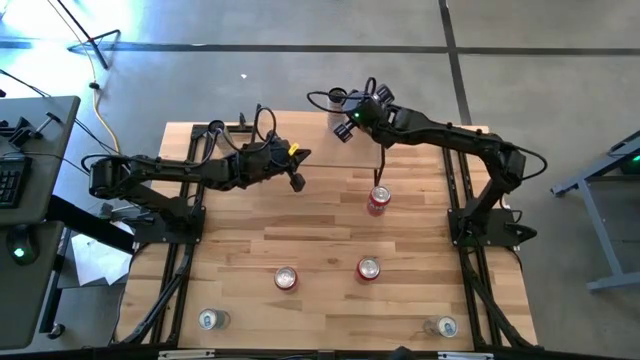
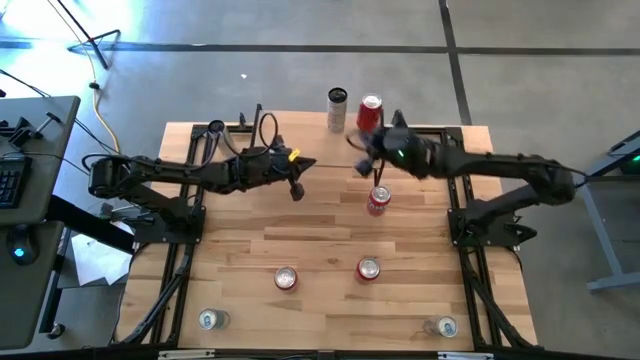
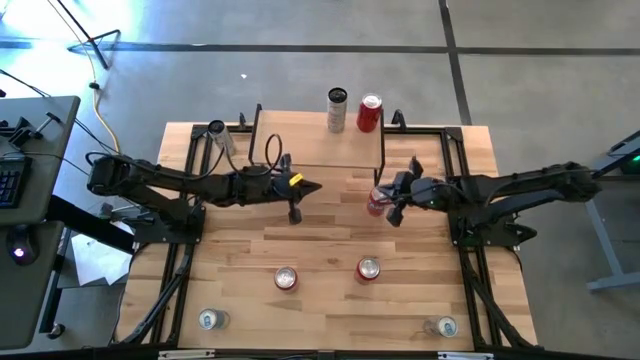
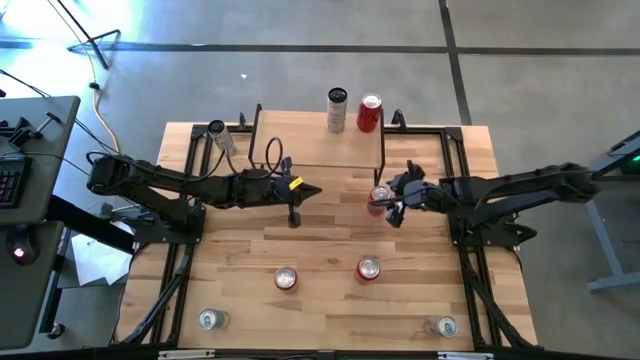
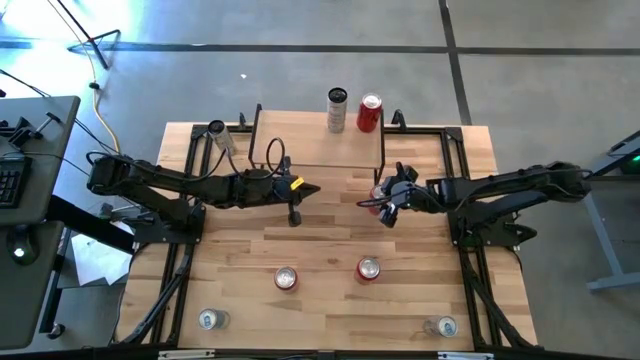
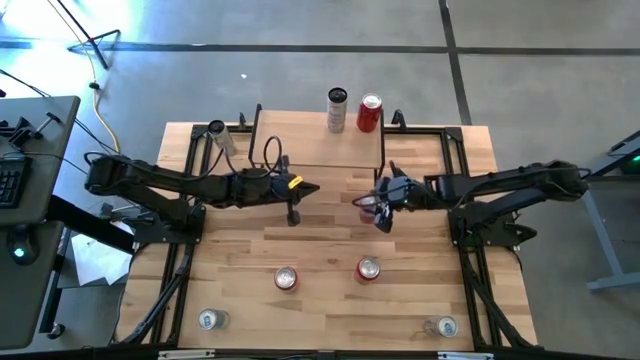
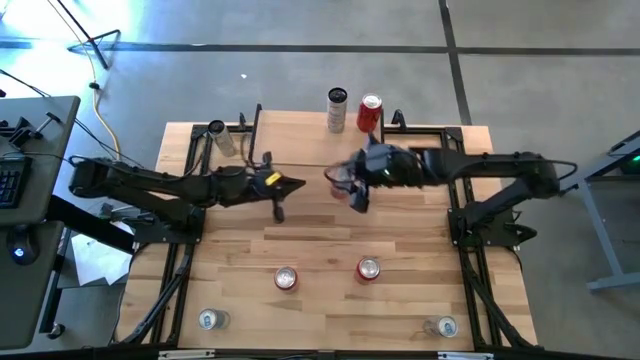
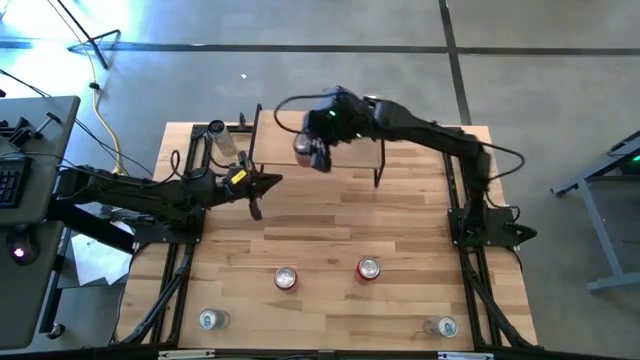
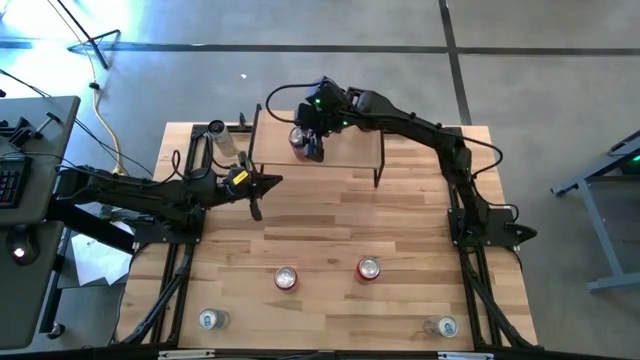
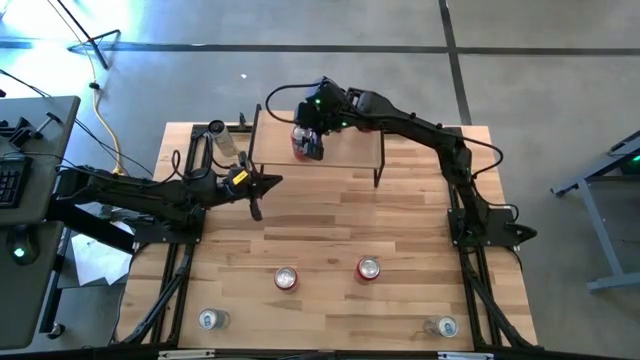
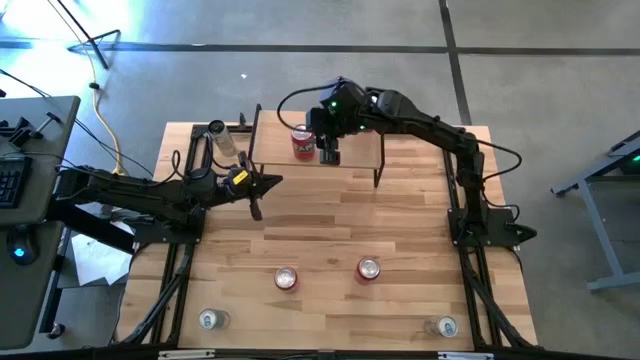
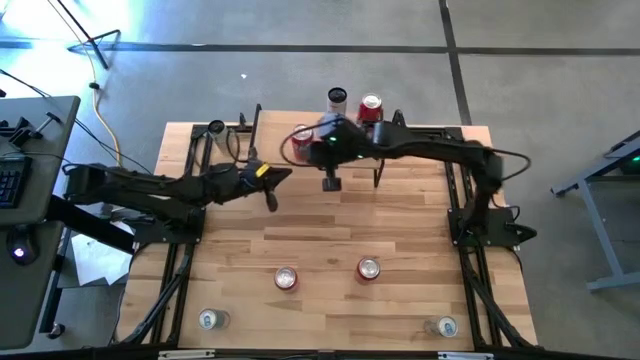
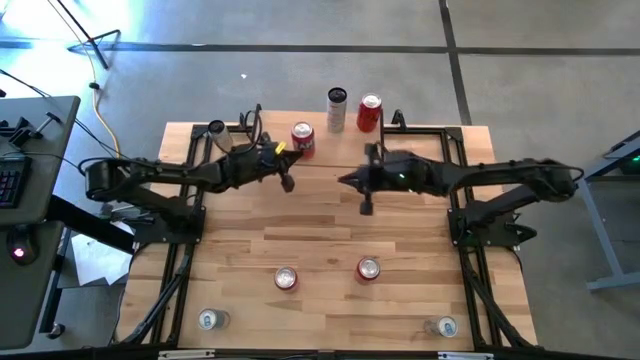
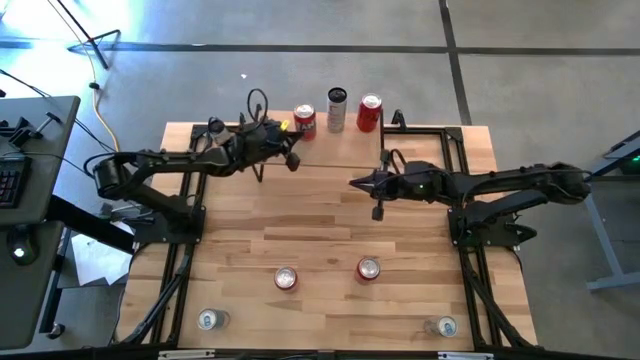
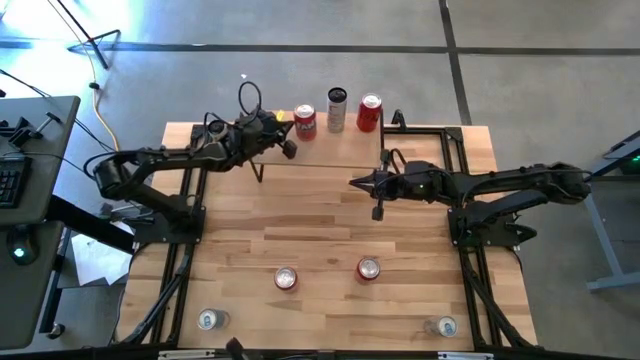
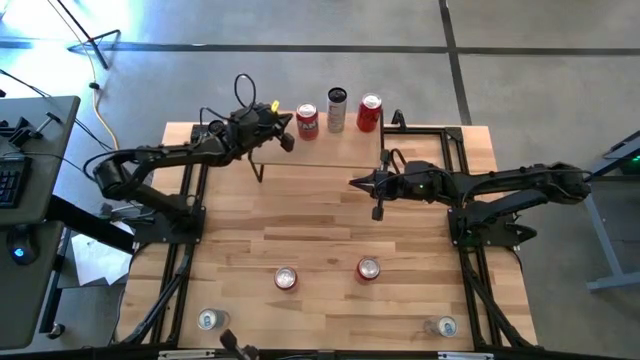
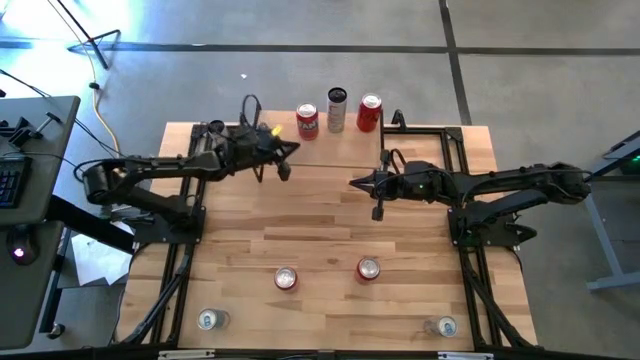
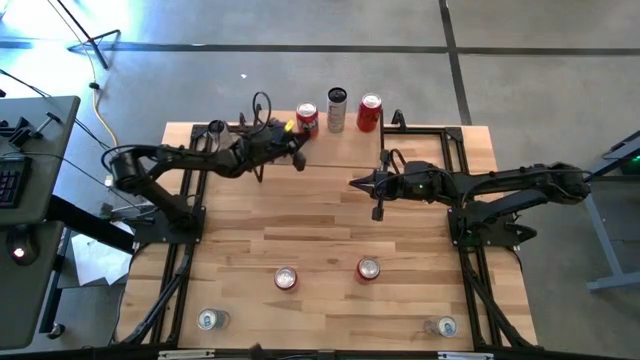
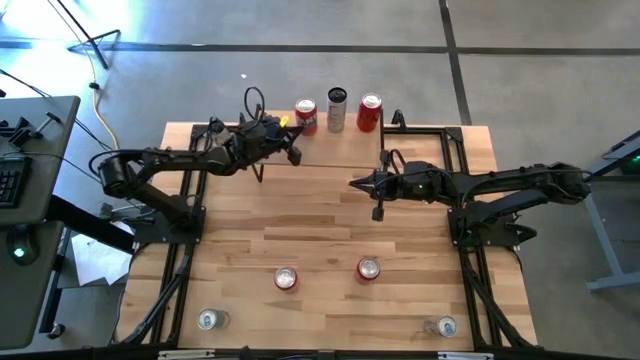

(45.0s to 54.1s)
Task: Place canned beverage on shelf
Put the top red soda can on the shelf

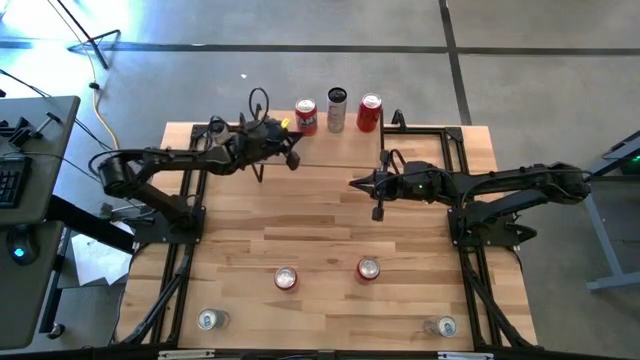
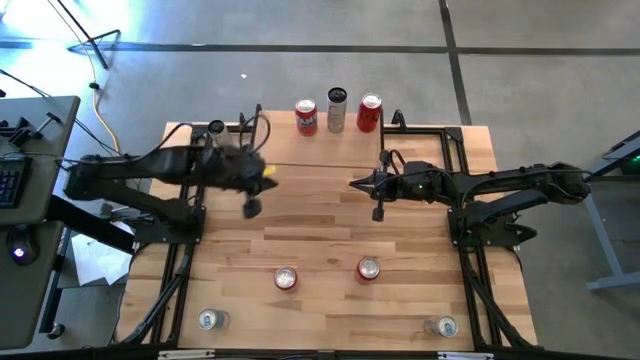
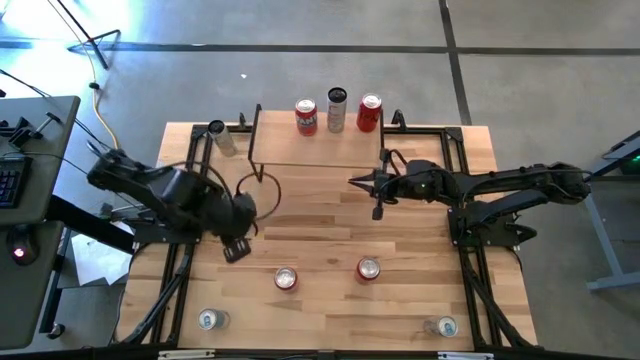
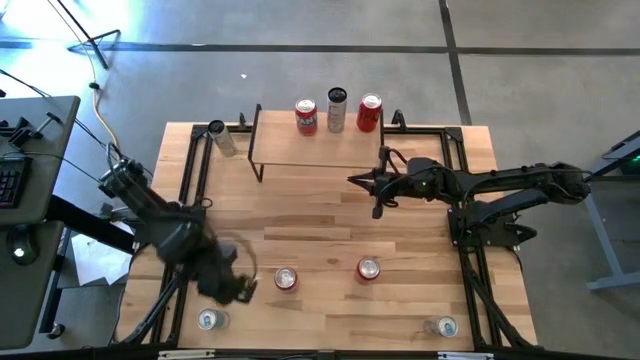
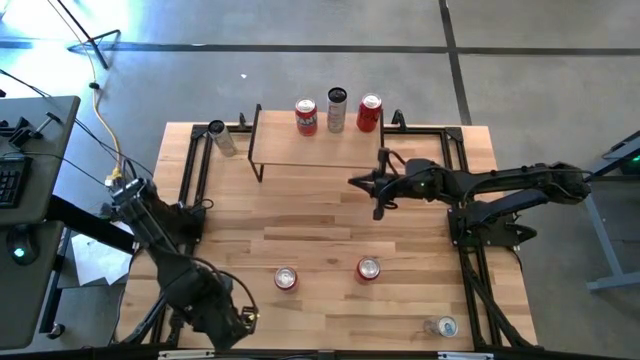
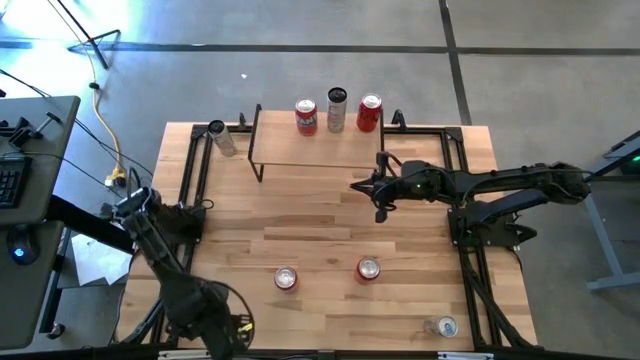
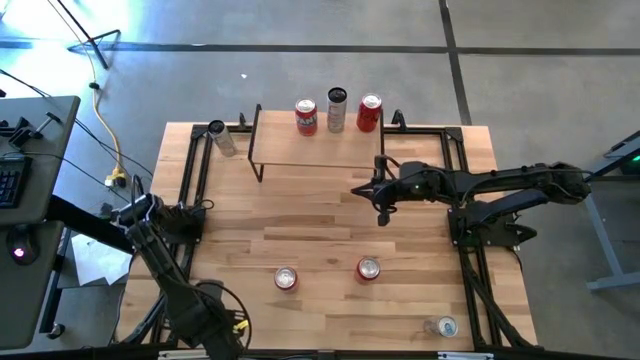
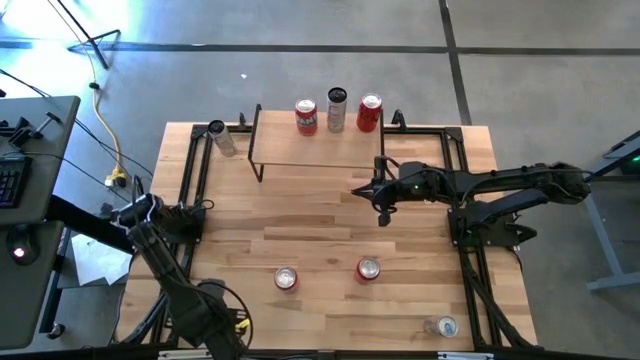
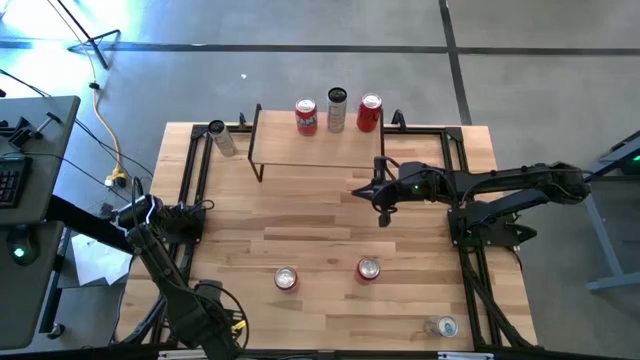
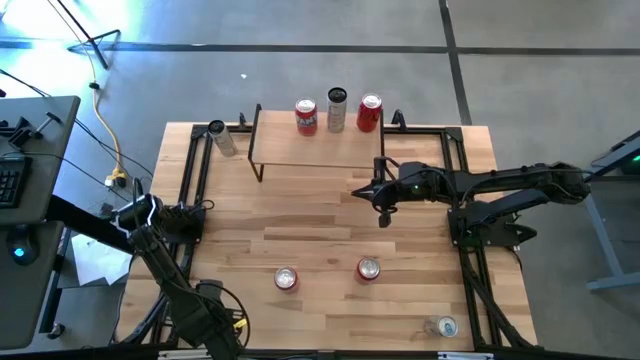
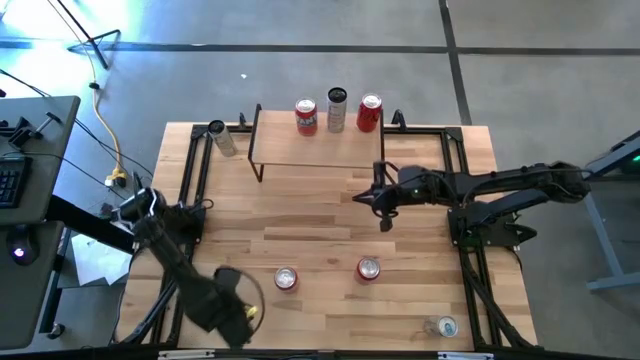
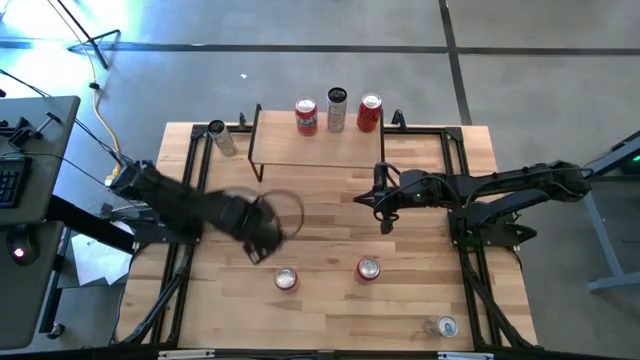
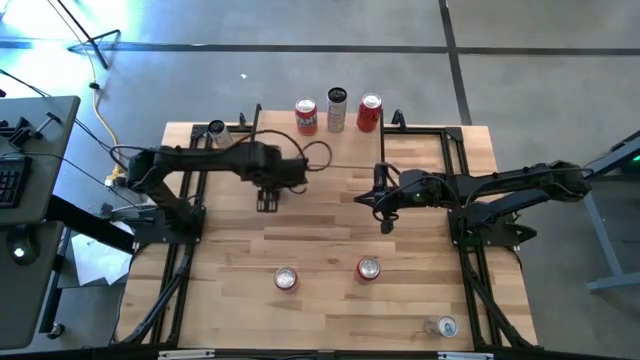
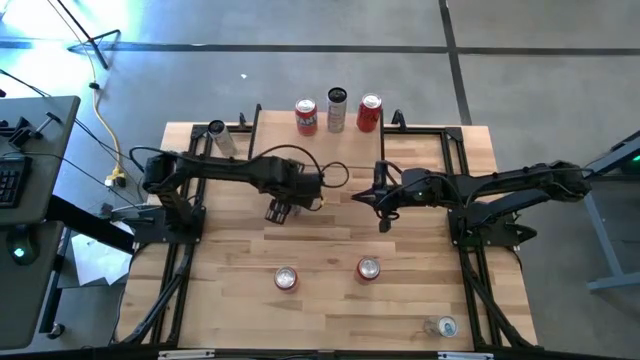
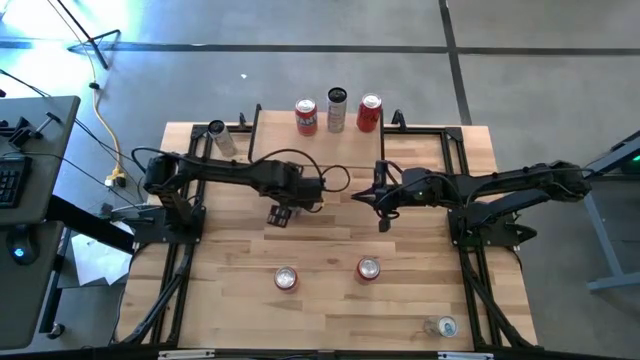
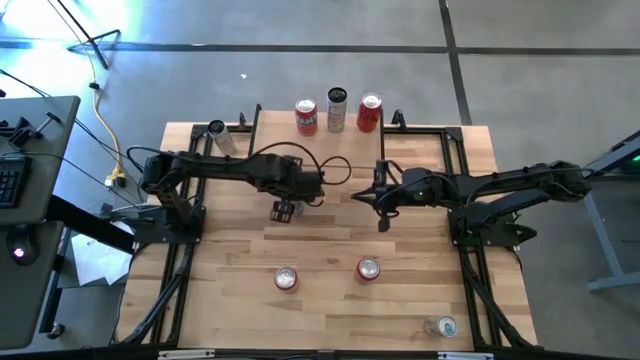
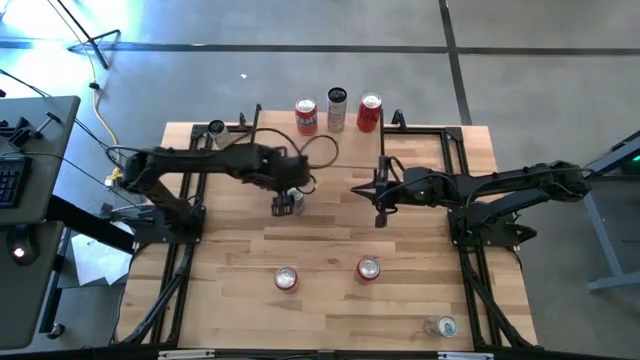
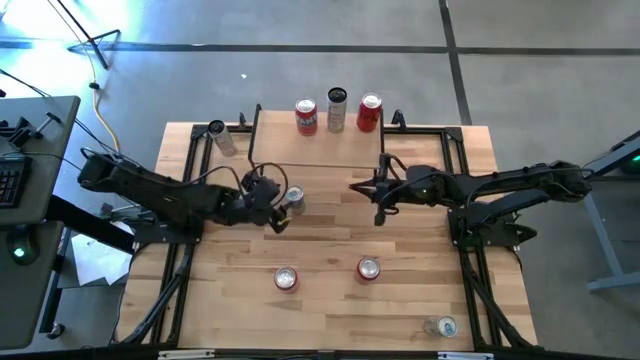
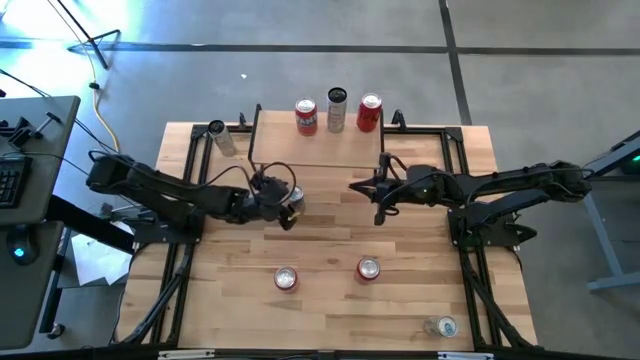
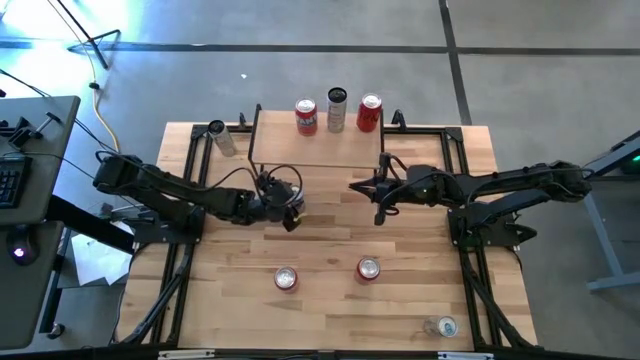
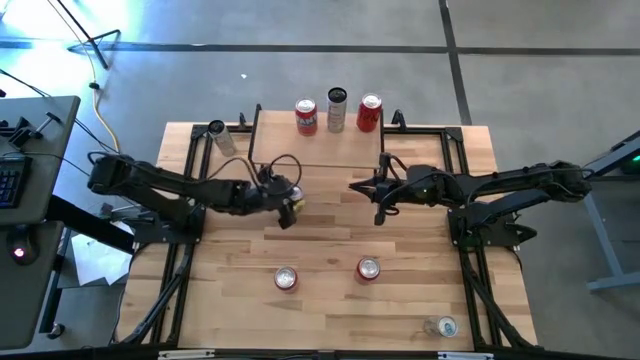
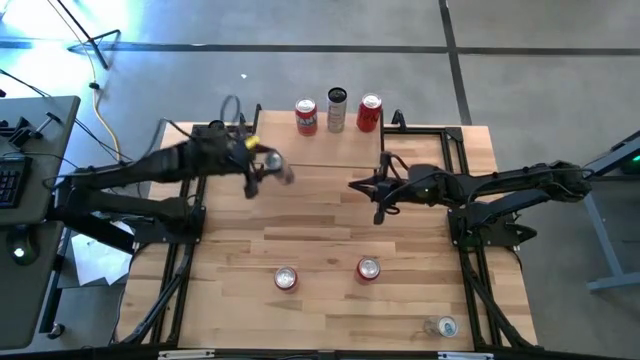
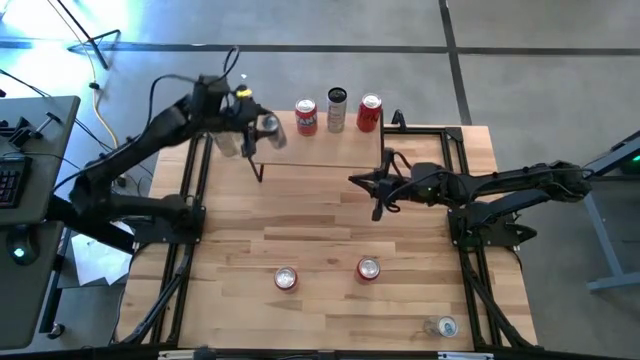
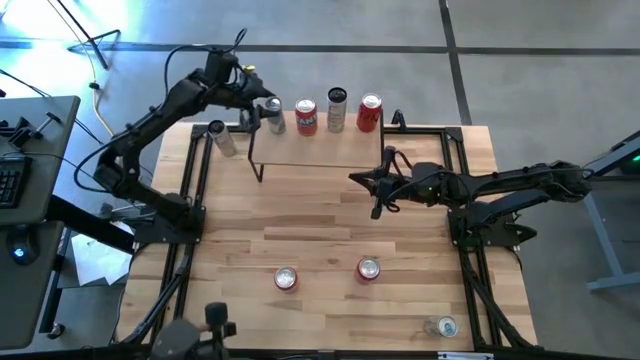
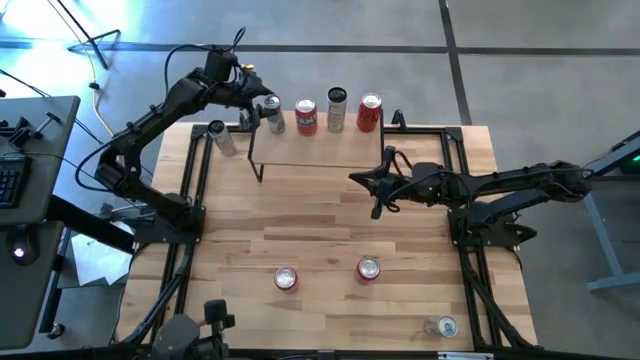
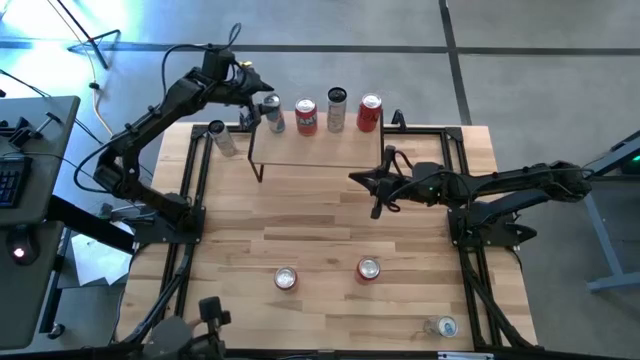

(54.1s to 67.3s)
Put the left blue soda can on the shelf

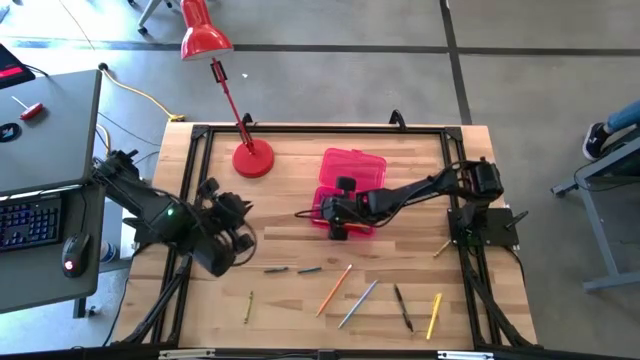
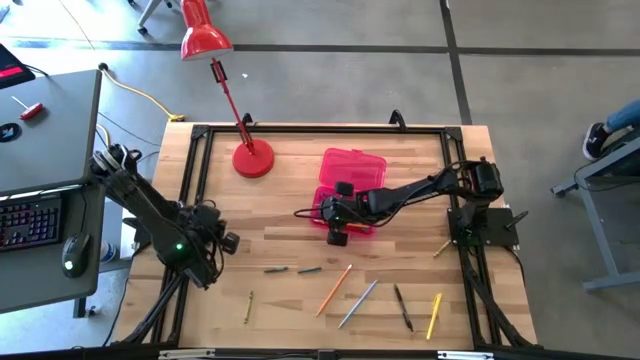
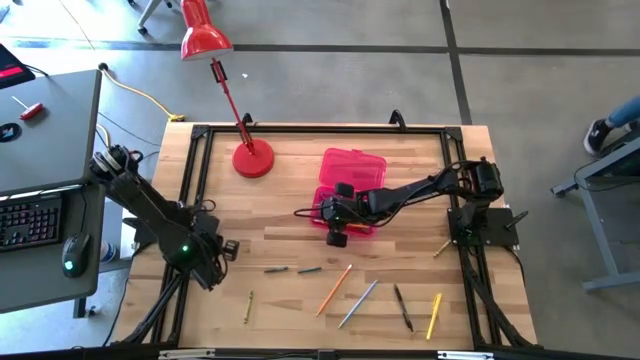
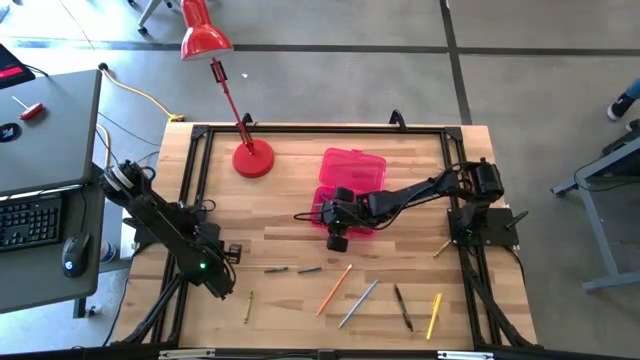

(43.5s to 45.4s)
Task: Pick & place school supplies into a supply box
Put the left dark green crayon into the red supply box
